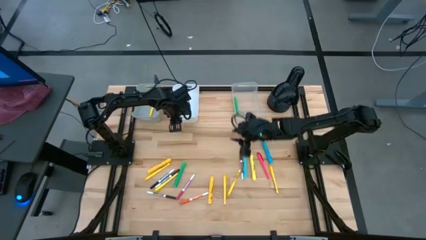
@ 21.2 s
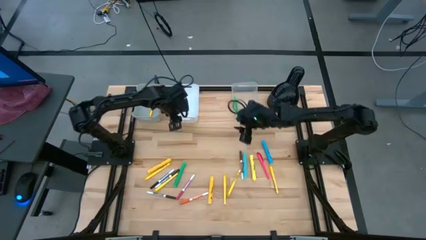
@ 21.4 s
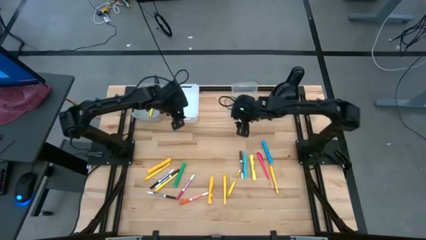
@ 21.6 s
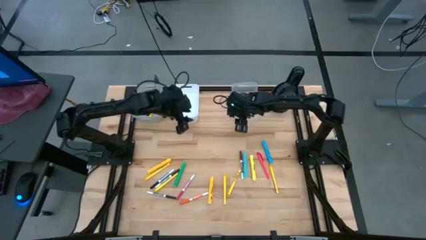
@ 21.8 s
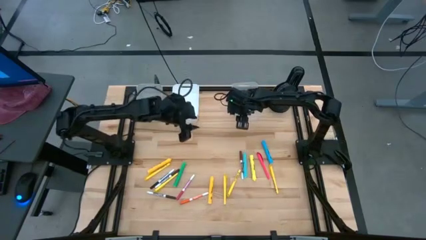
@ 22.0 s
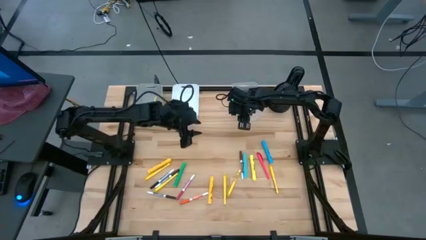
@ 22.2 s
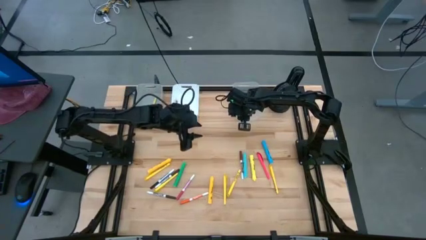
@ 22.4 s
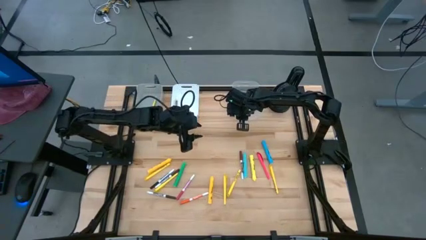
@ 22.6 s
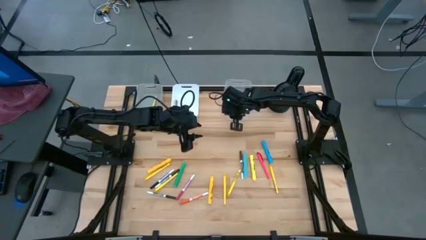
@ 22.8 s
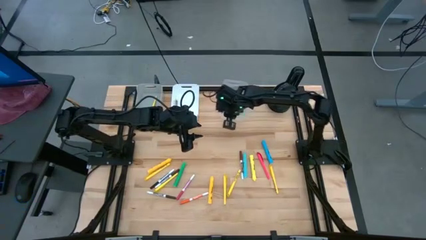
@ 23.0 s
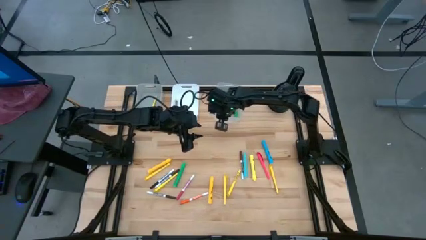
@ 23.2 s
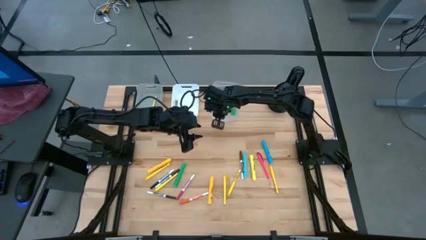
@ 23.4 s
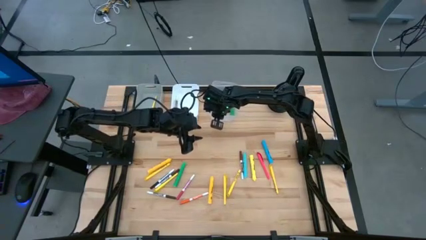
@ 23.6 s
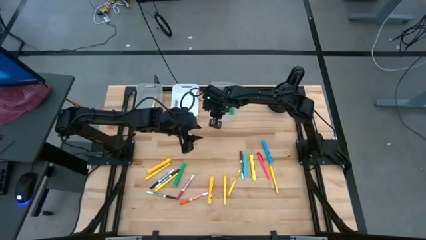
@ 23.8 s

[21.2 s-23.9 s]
Task: Pick & Place Markers
Move the white bin to the right of the gray bin

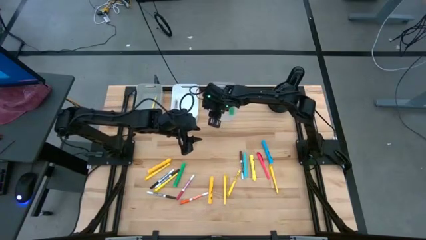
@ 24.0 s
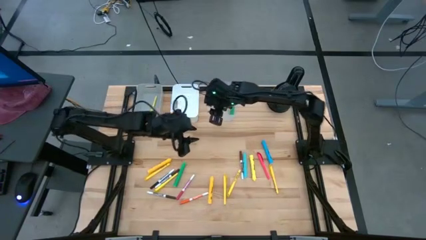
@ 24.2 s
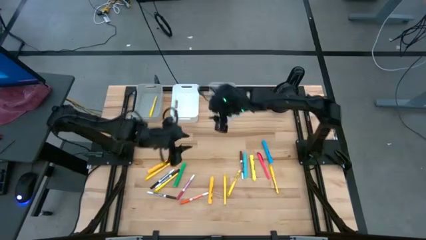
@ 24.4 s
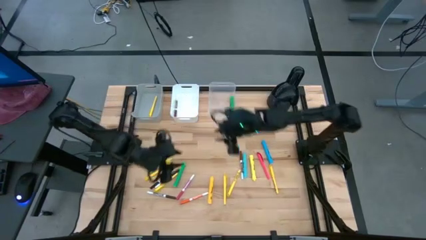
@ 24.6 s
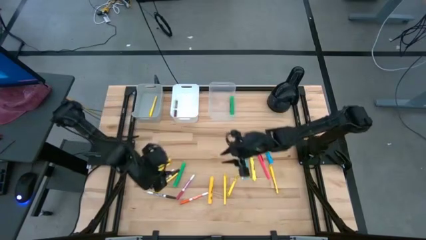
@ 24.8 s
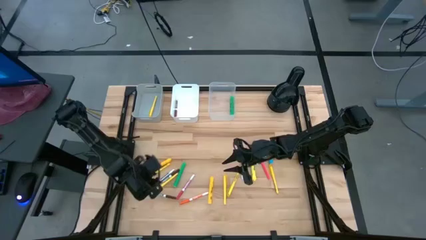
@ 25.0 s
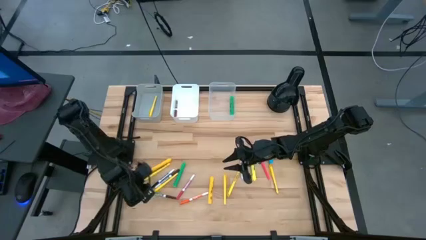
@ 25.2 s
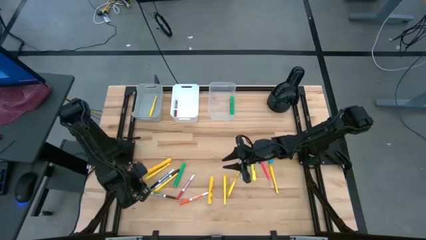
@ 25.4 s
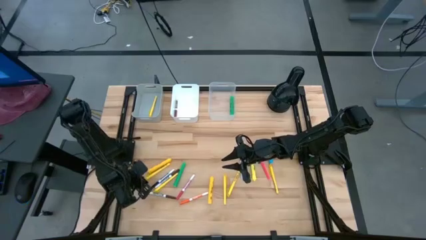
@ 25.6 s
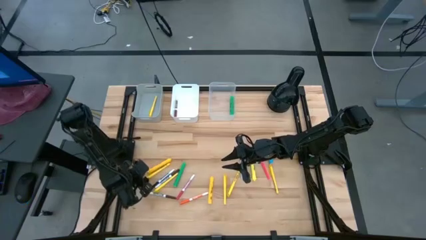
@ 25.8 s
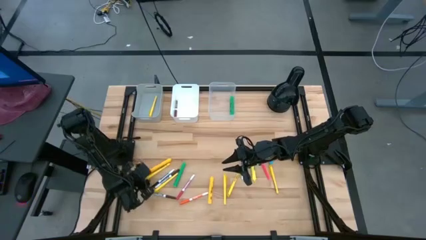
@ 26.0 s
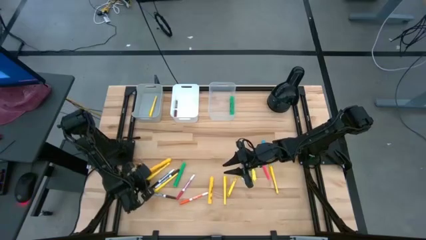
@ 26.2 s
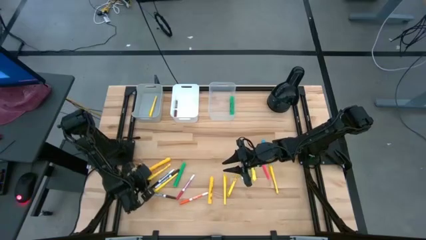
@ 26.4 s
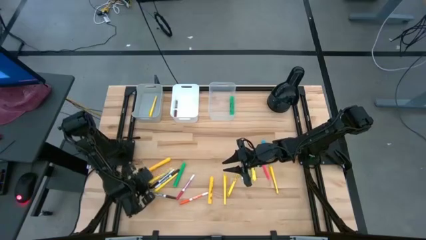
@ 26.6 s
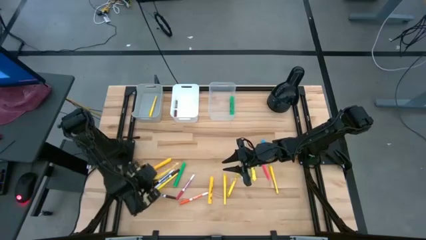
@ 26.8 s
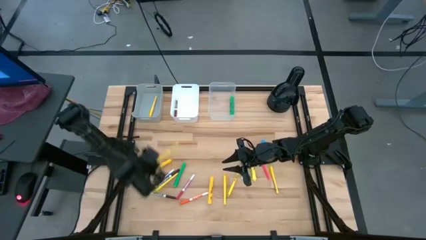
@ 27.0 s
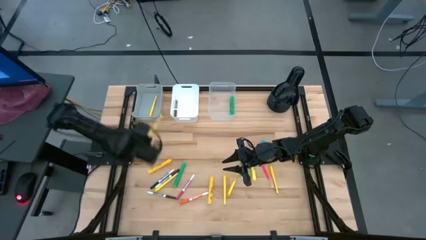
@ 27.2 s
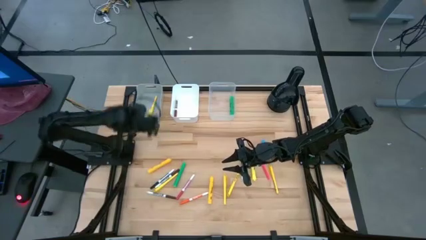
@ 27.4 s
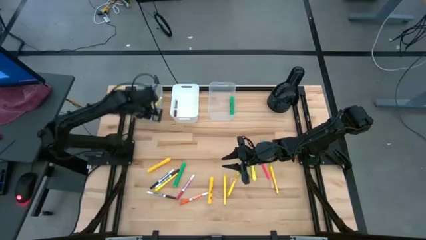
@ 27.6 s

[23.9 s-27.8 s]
Move the transparent bin to the right of the white bin

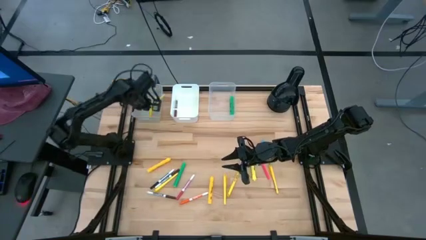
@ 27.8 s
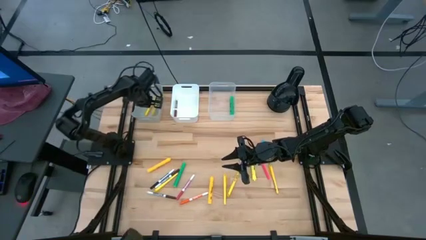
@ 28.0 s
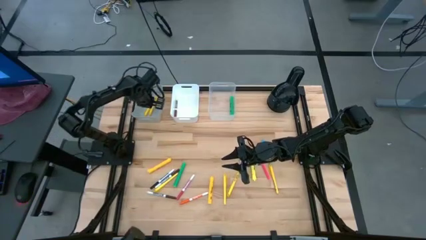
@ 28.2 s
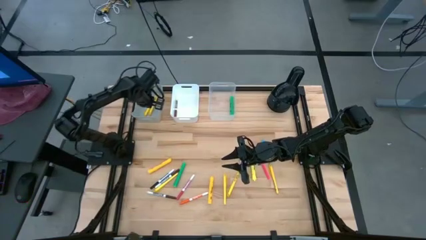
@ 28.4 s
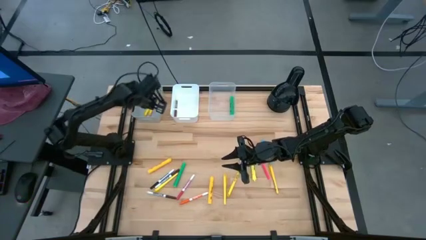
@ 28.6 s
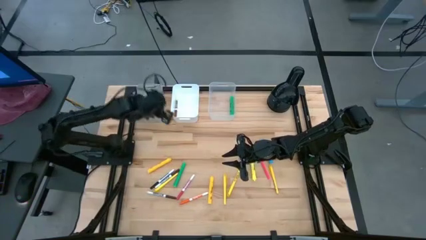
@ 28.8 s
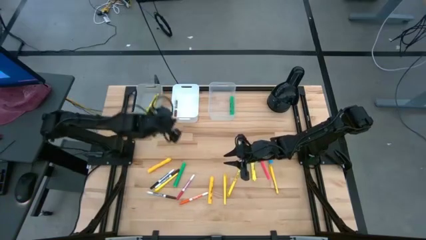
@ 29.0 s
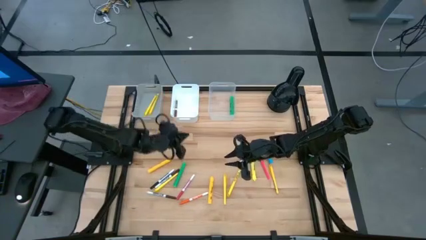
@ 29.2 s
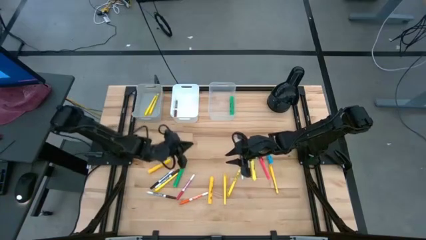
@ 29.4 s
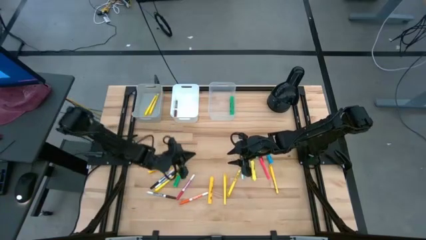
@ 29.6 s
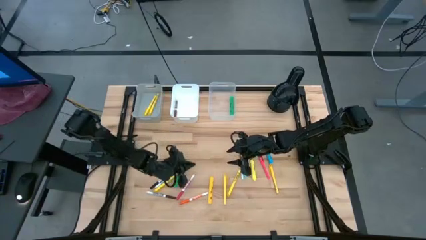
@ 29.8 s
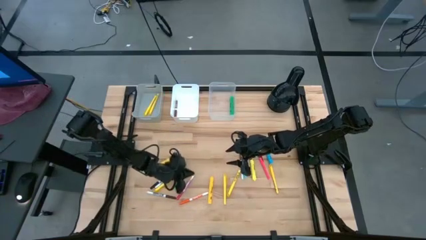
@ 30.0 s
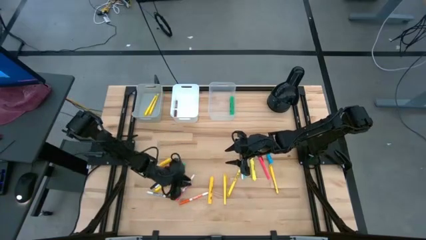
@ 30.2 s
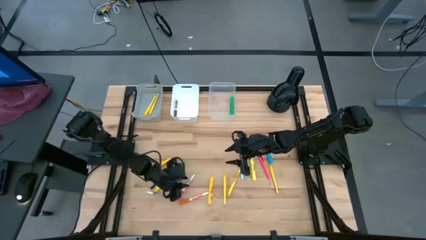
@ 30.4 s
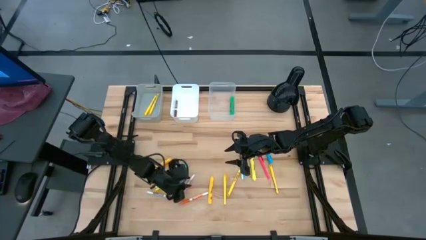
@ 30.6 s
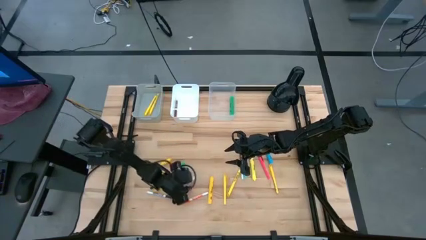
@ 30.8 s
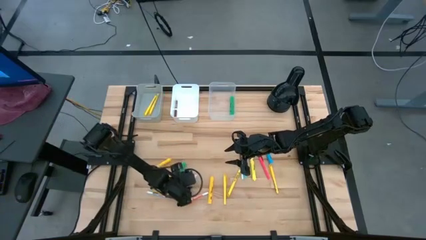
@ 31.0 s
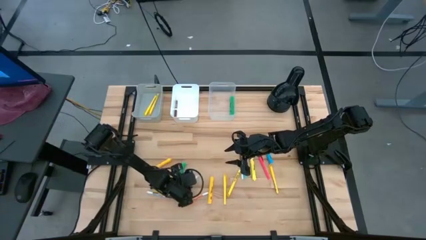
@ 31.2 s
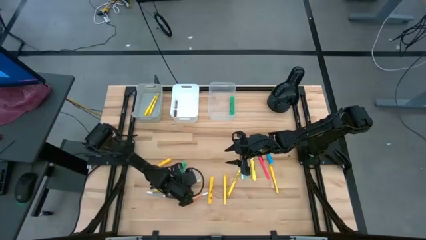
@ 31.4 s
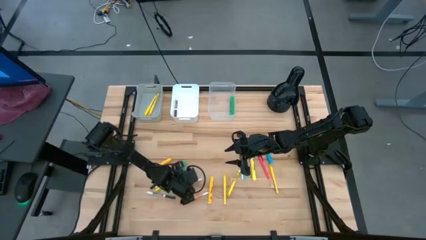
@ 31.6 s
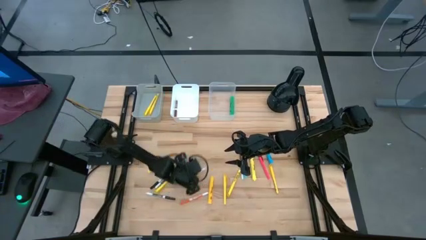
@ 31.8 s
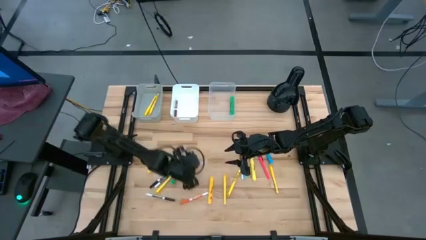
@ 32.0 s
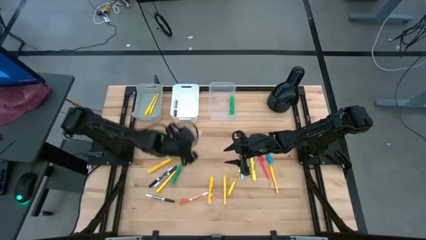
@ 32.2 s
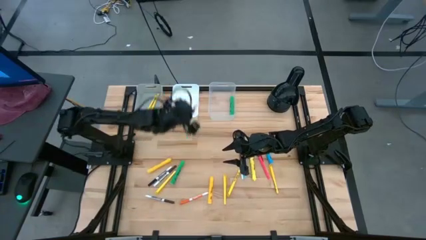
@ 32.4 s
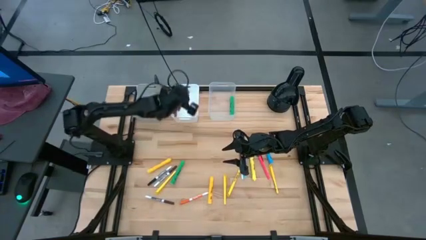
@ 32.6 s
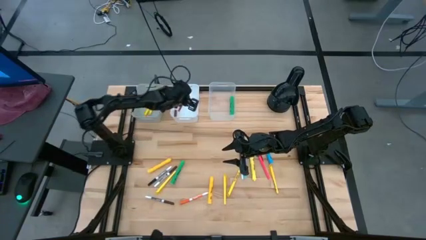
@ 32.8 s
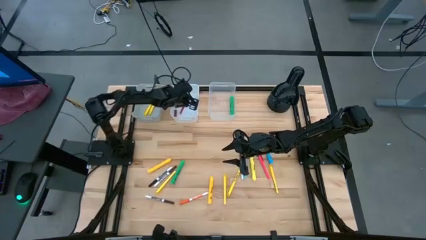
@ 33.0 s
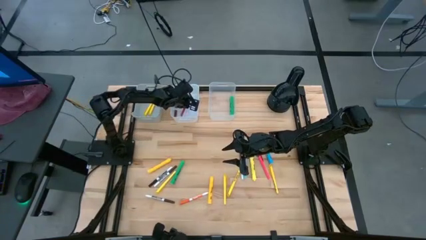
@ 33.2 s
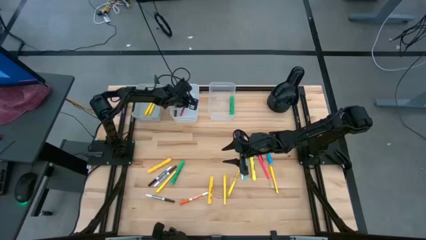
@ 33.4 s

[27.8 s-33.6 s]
Put the pink erase marker into the white bin

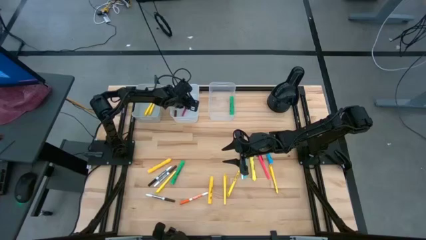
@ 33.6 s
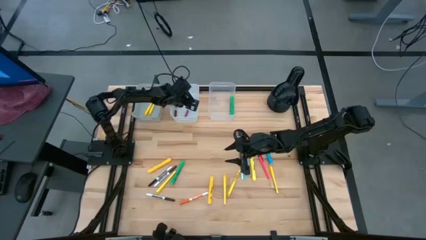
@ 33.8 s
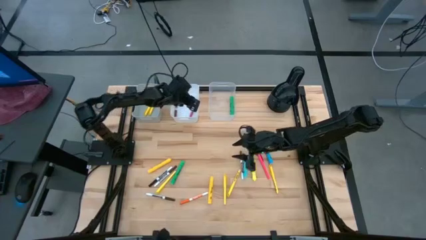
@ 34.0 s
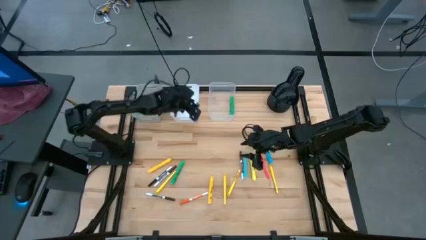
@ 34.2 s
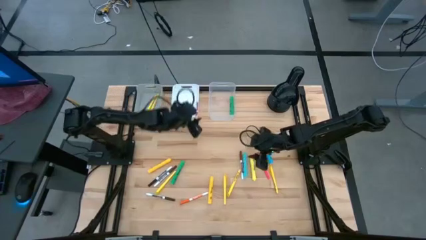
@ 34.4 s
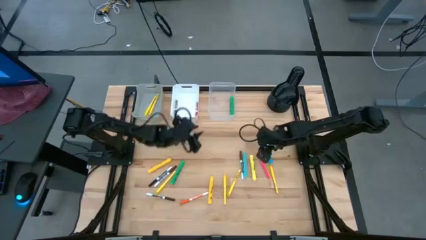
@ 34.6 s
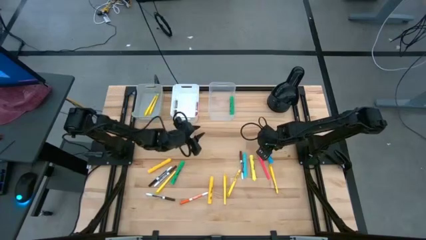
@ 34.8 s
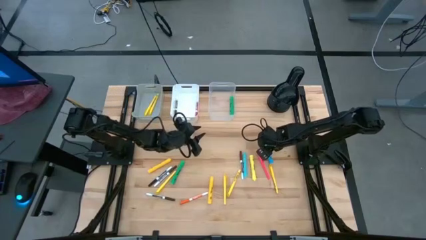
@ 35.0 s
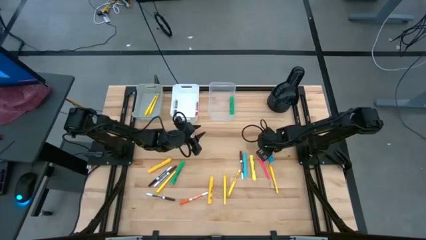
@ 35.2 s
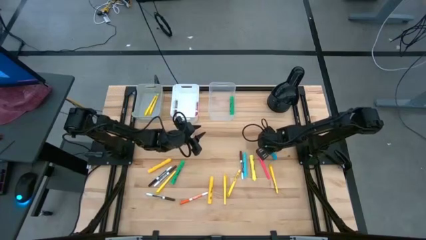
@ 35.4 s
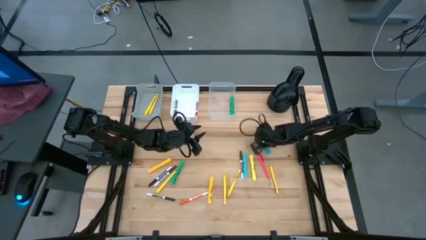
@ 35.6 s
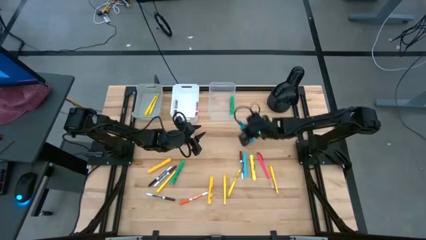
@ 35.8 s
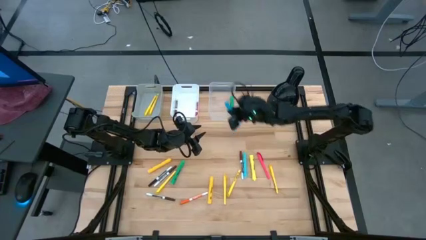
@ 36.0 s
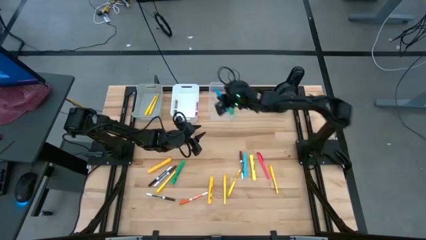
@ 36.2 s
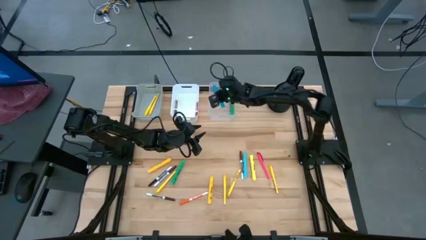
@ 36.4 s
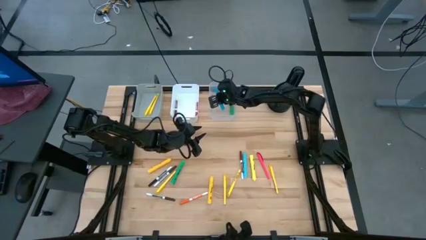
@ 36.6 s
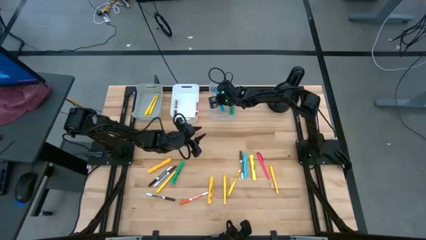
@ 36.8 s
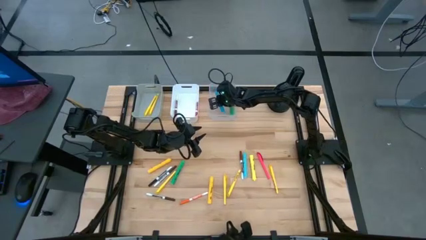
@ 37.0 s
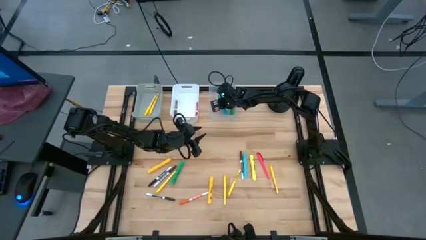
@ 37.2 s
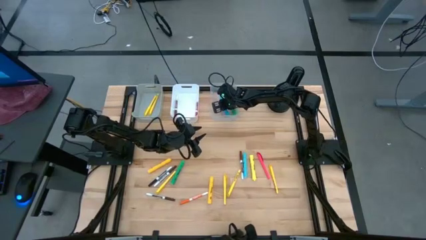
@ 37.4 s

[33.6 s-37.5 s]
Put the blue highlighter into the transparent bin
